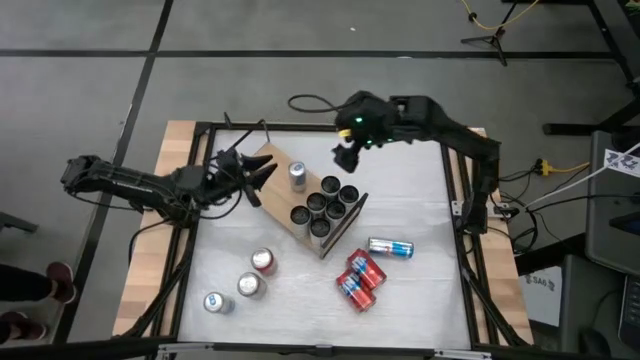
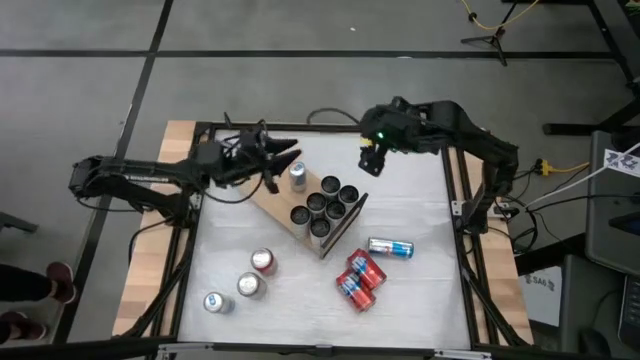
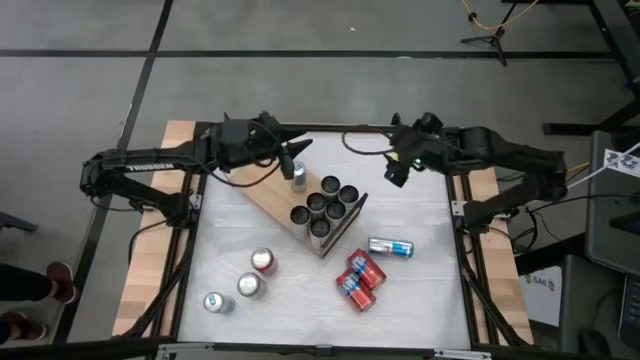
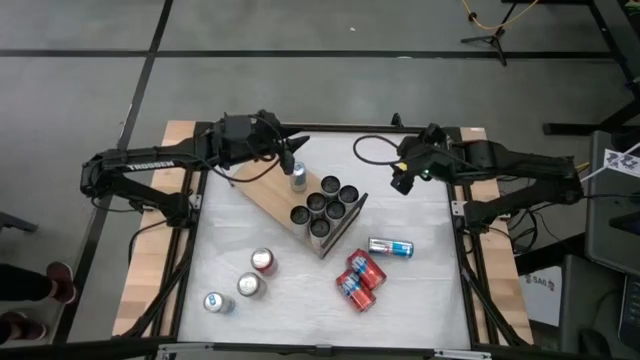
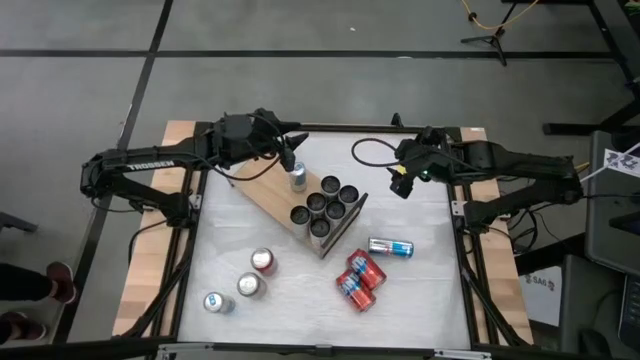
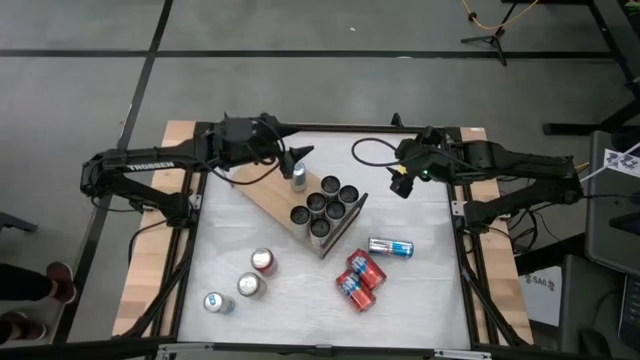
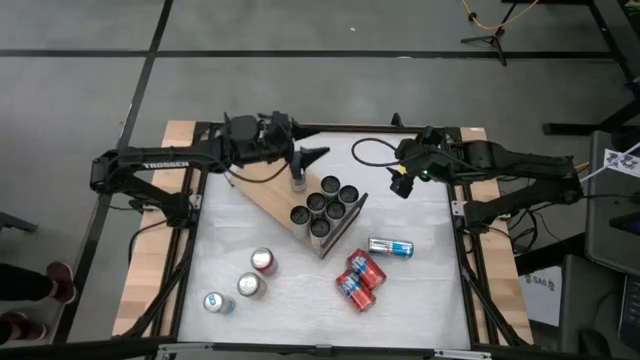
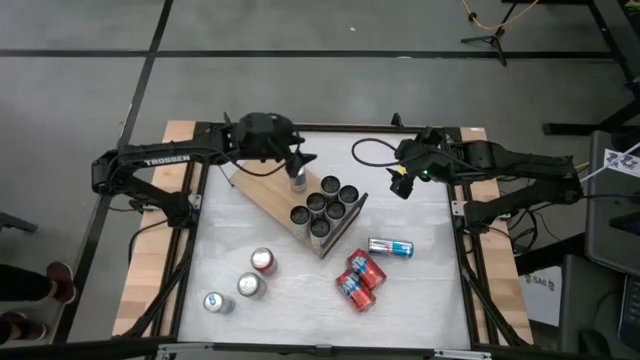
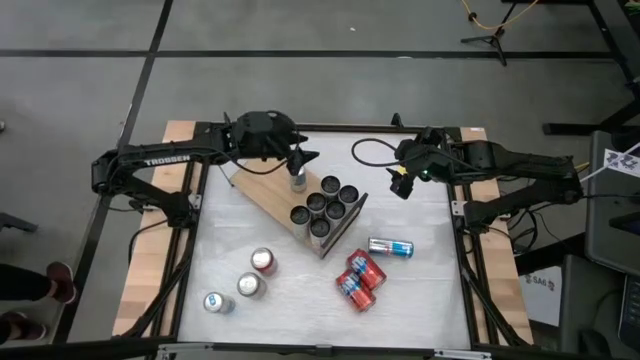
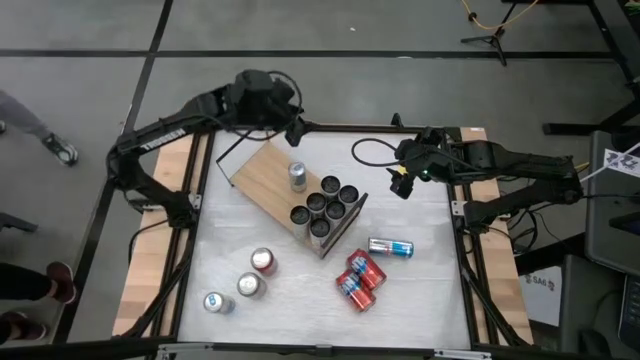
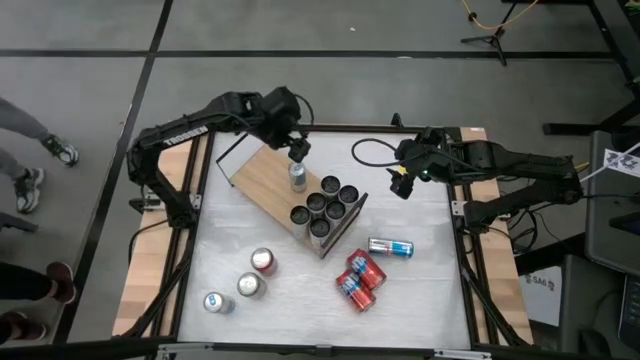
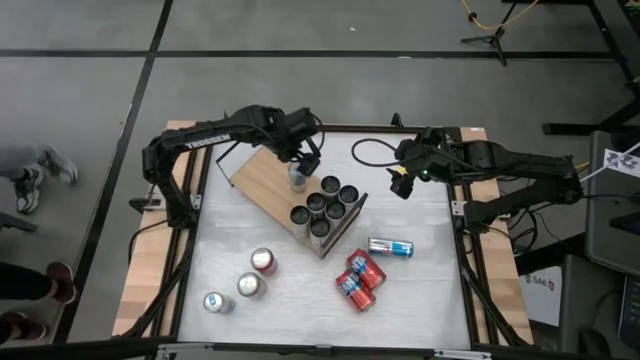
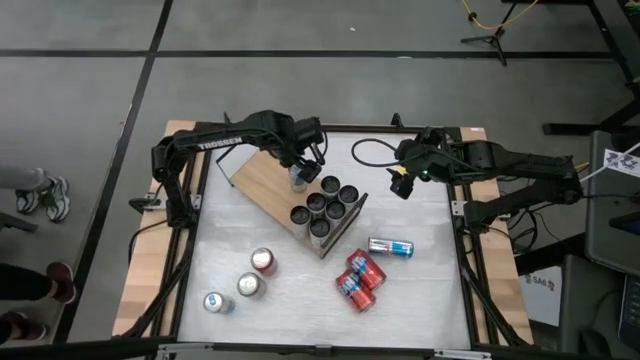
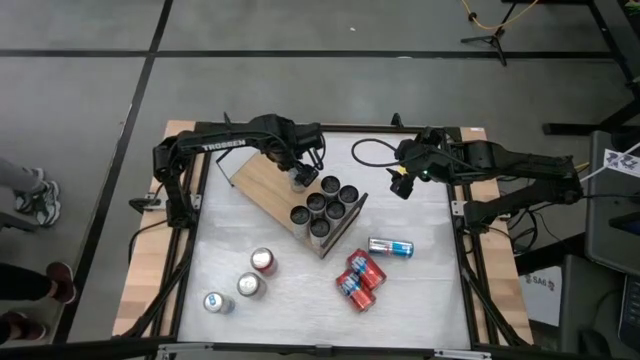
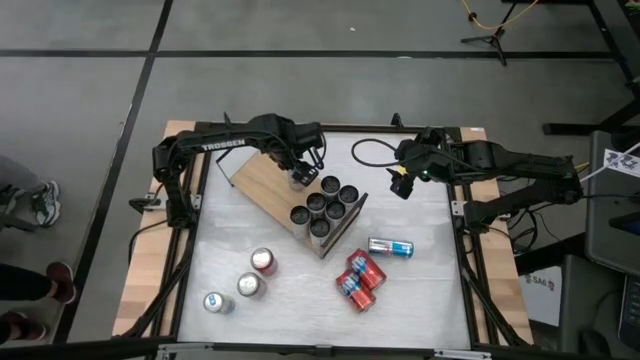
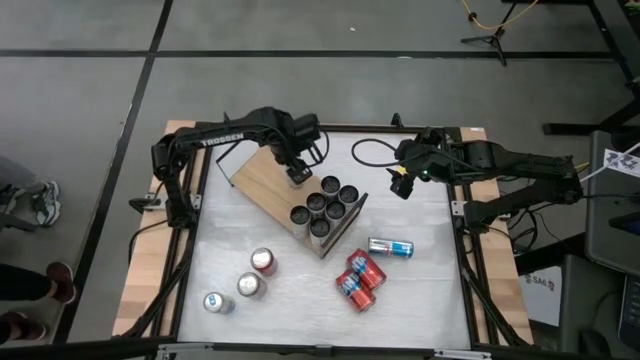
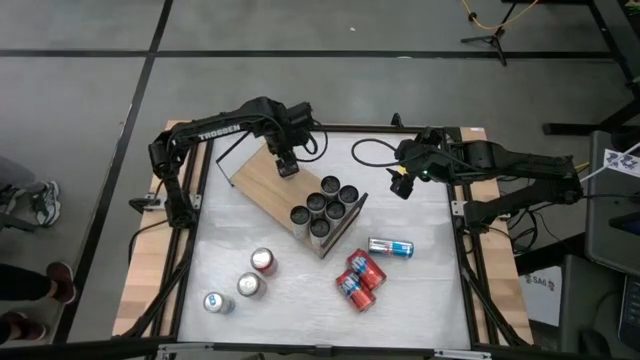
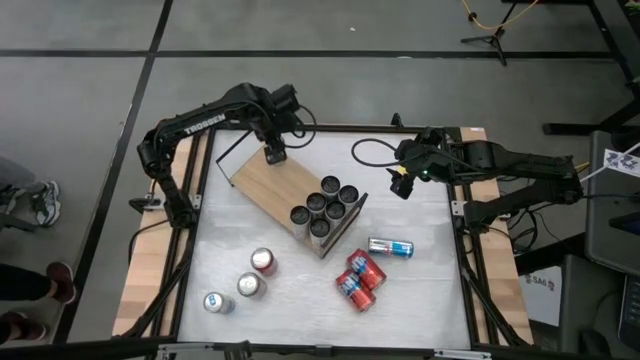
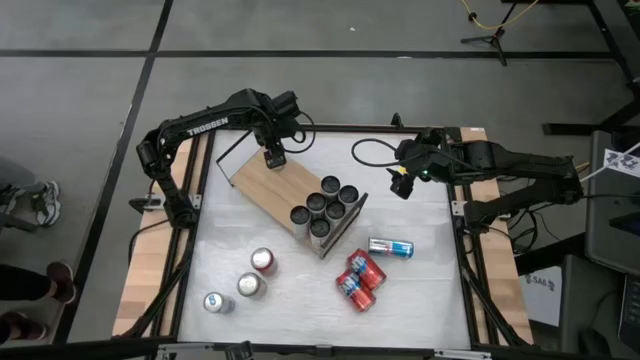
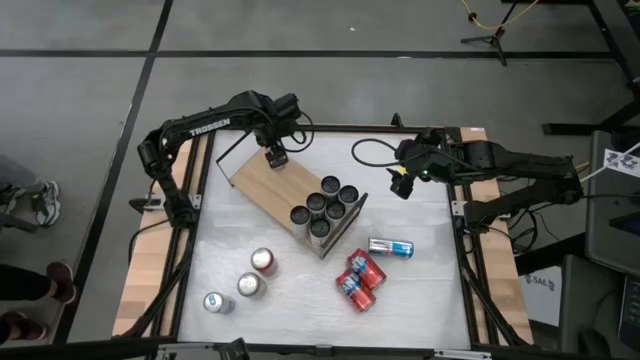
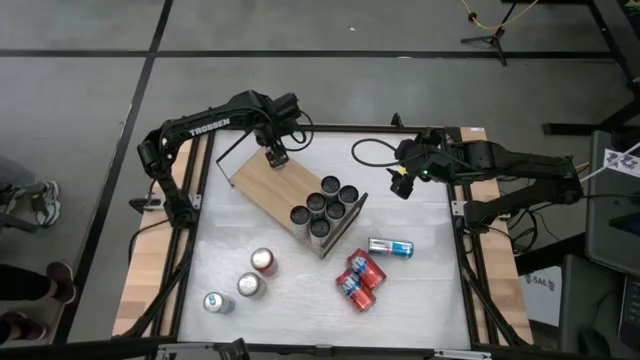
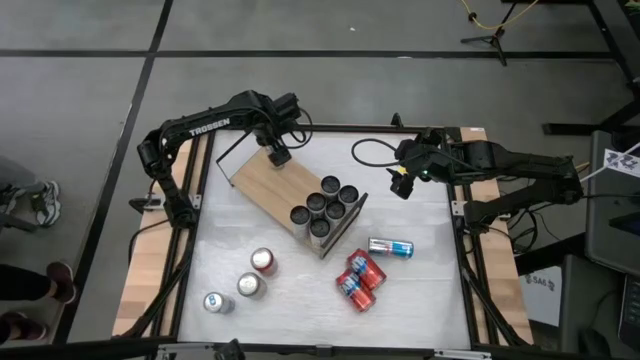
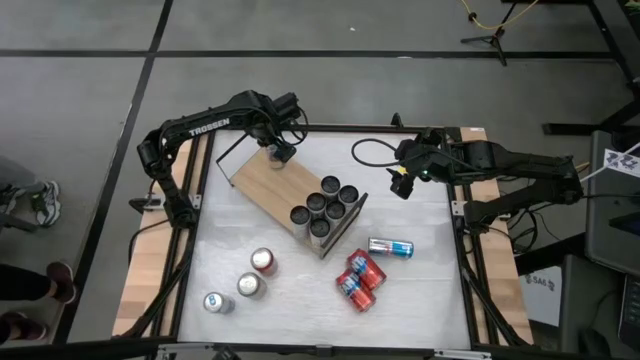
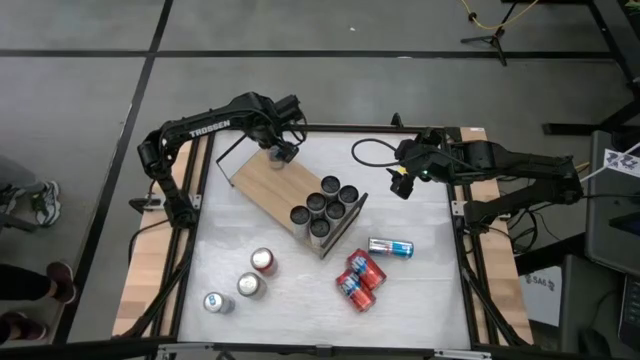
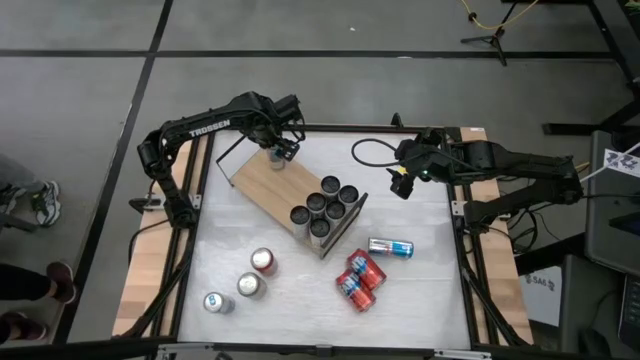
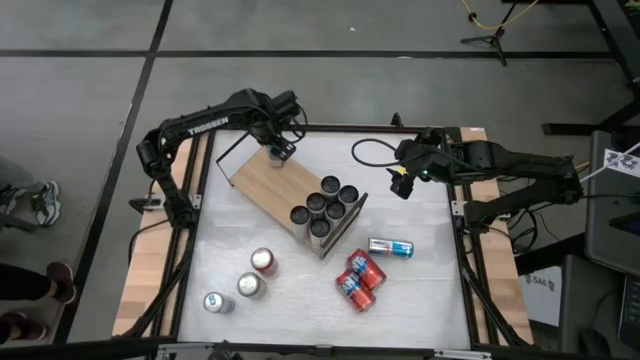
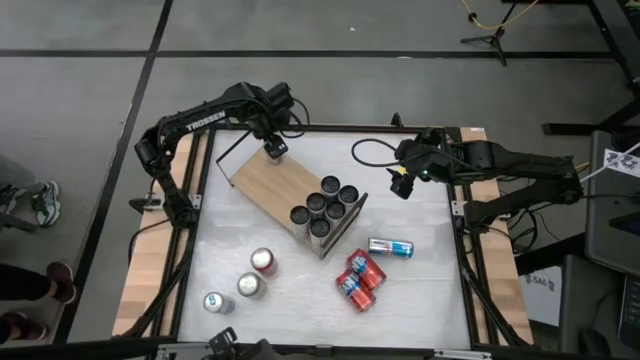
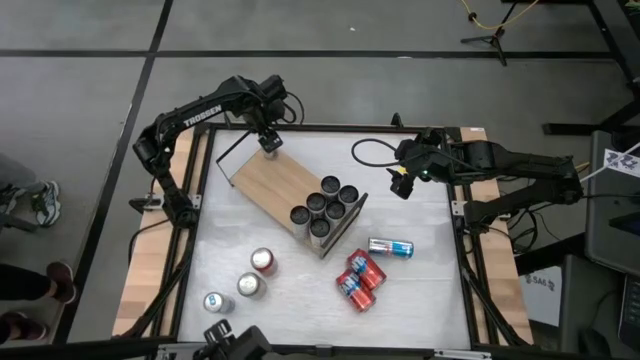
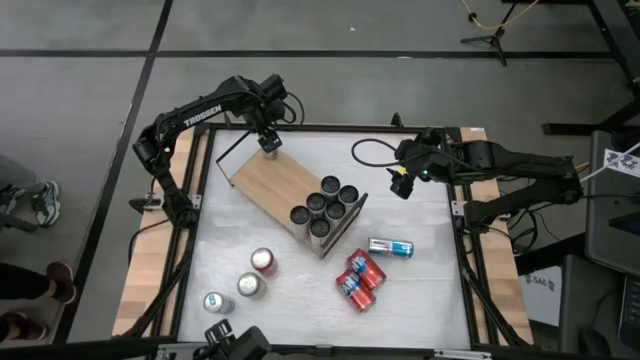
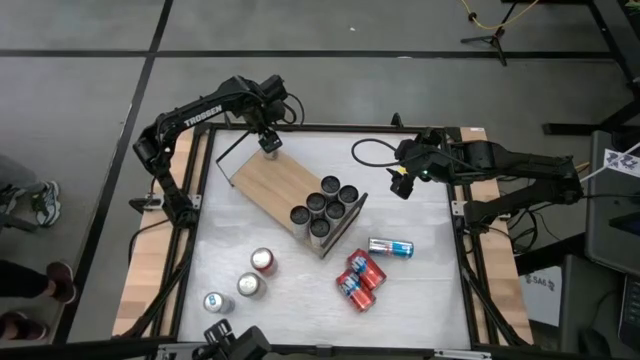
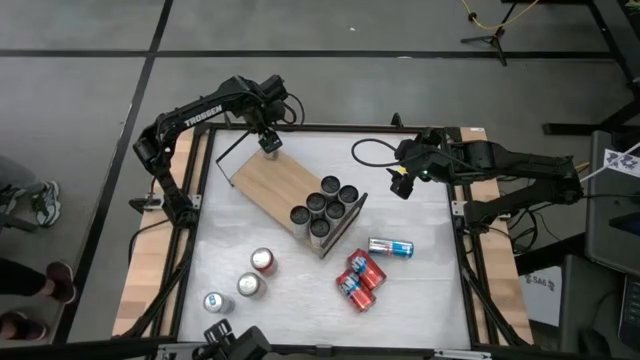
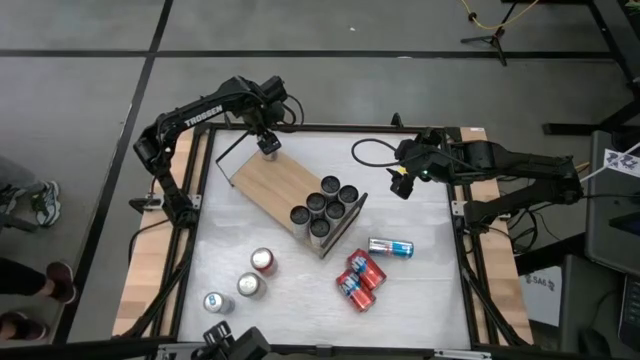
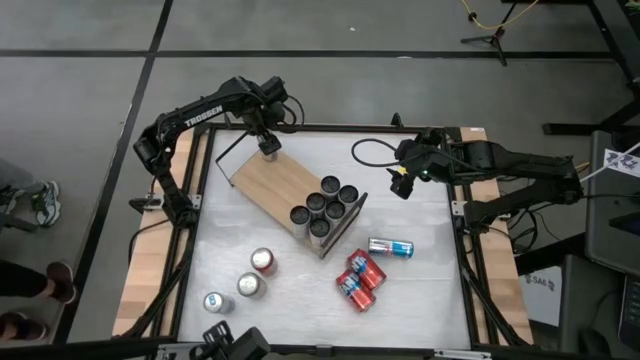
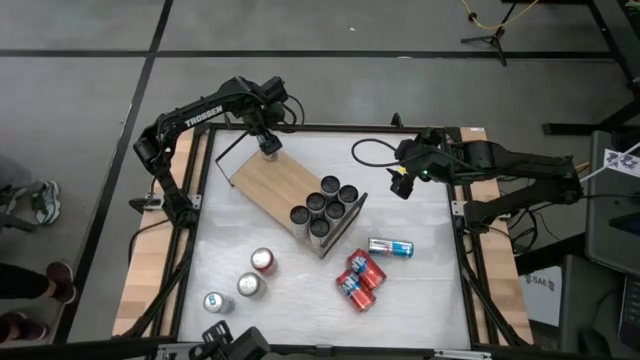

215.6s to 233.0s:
Task: Place canned beverage on shelf
Put the top right blue soda can on the shelf
